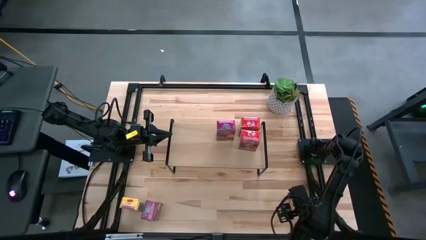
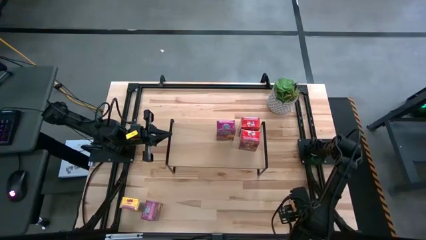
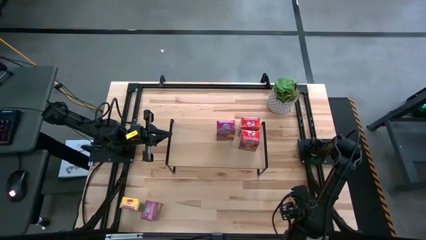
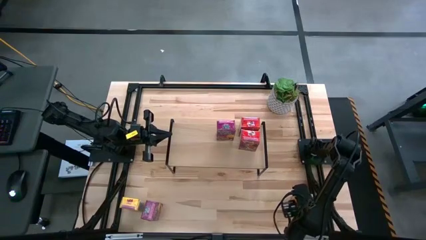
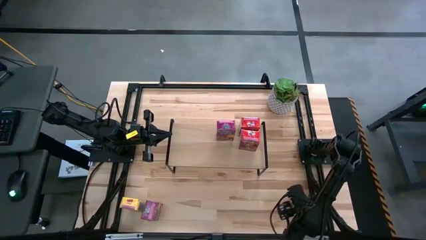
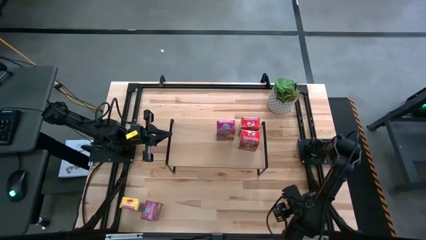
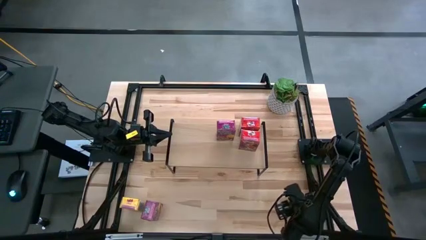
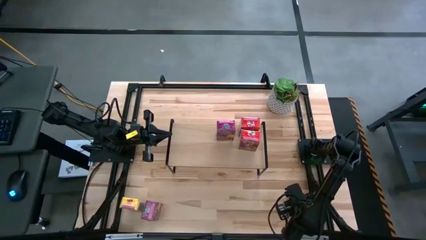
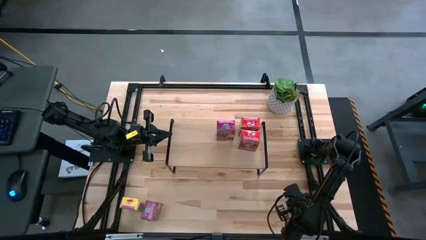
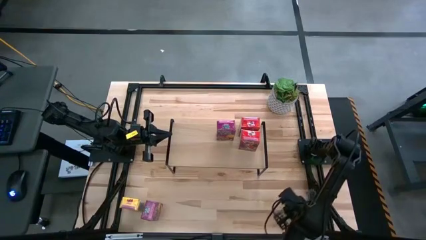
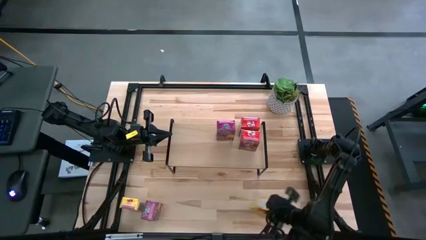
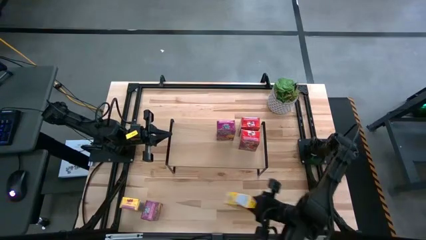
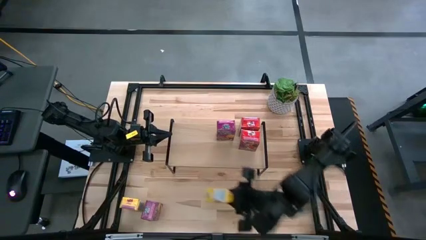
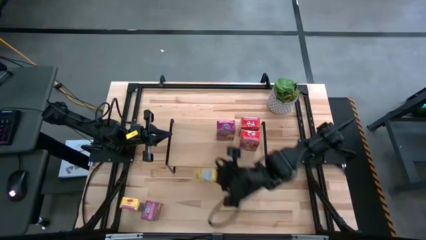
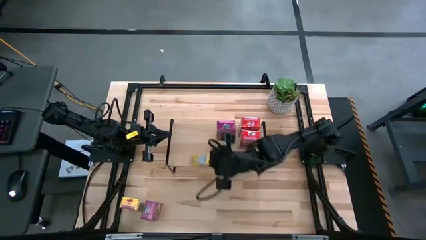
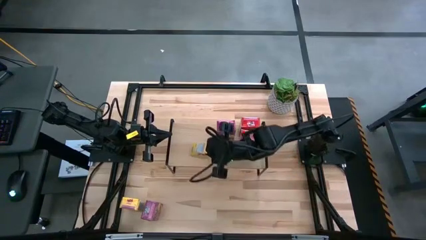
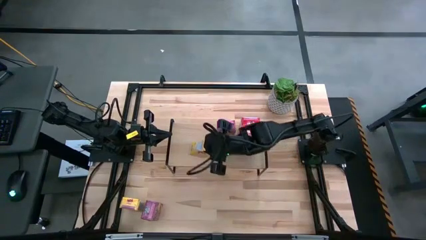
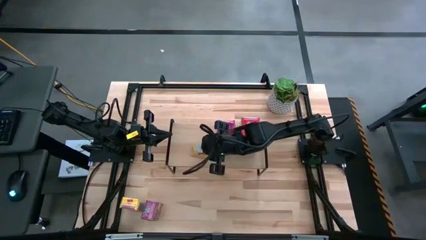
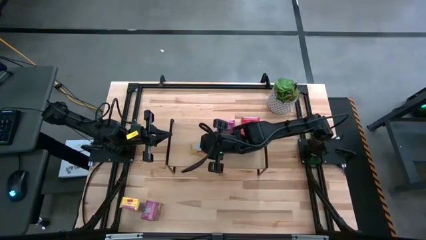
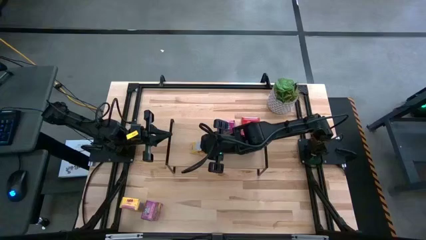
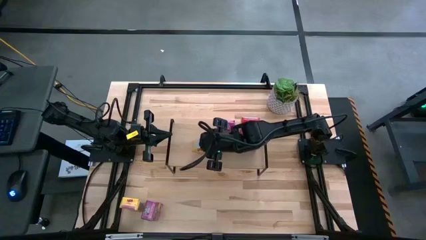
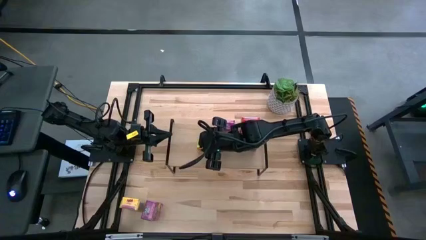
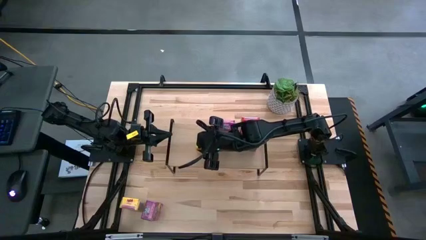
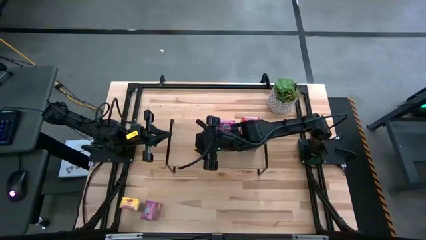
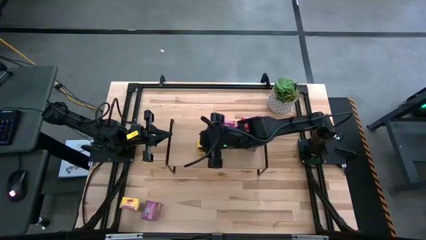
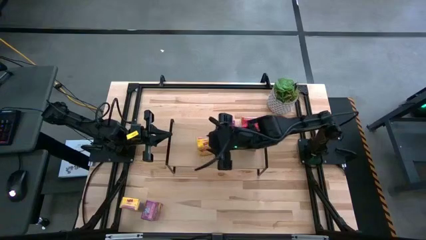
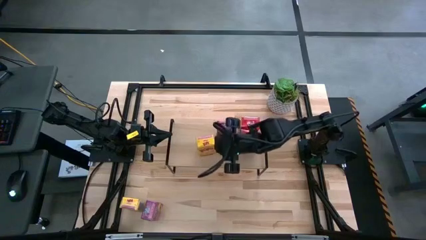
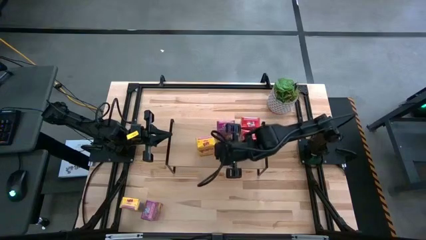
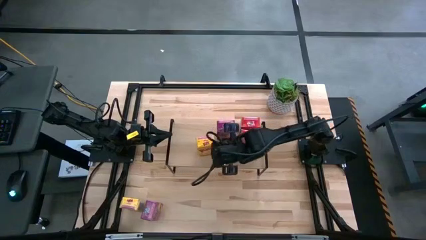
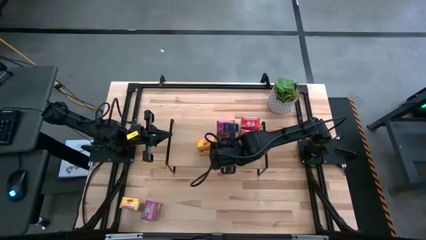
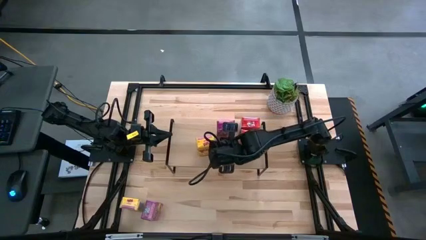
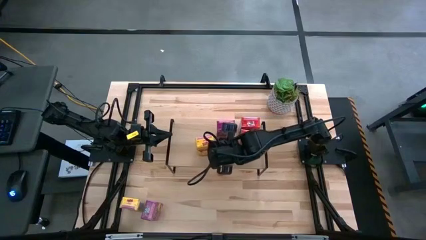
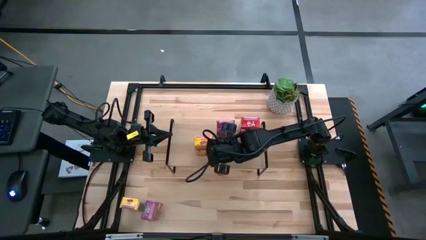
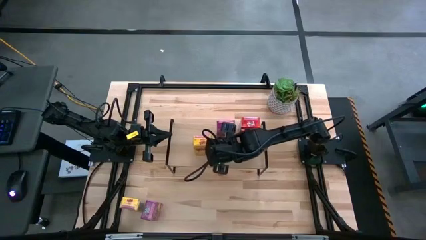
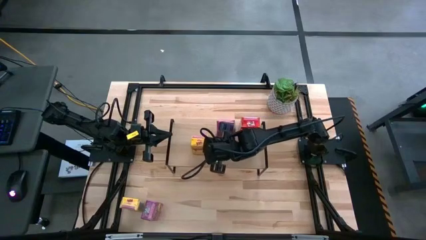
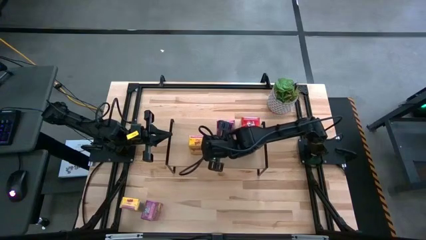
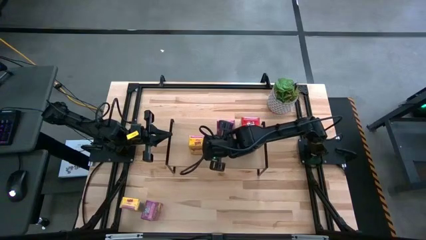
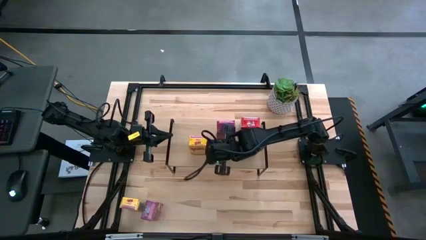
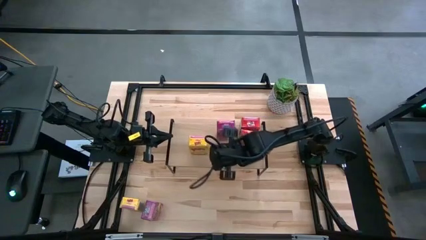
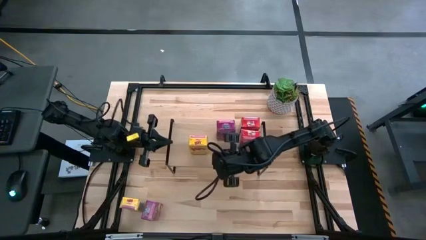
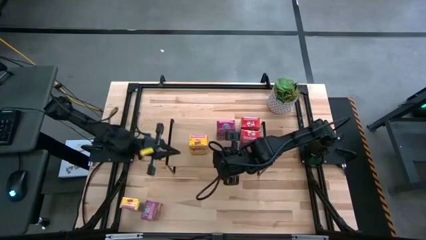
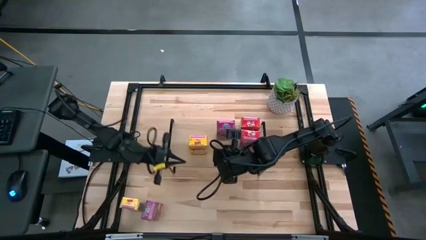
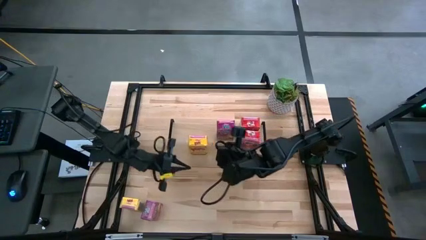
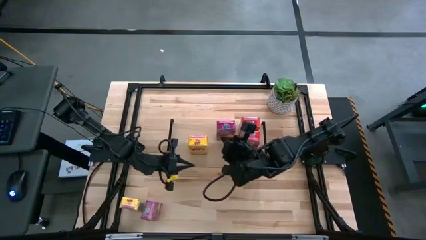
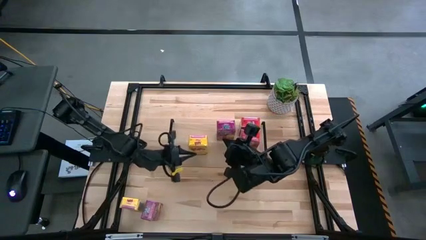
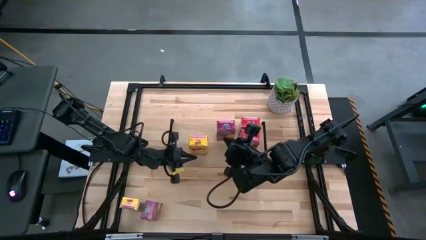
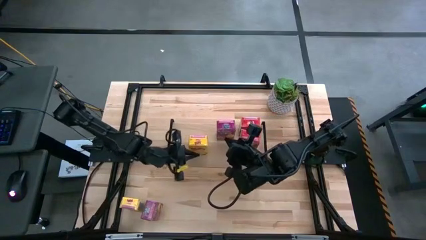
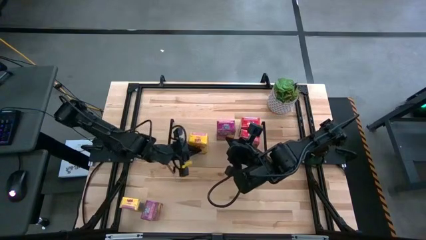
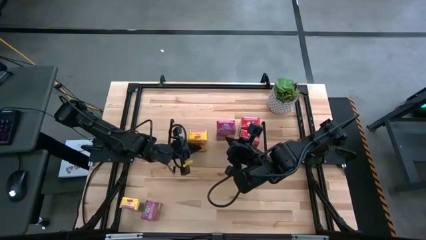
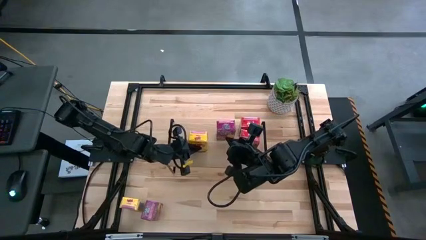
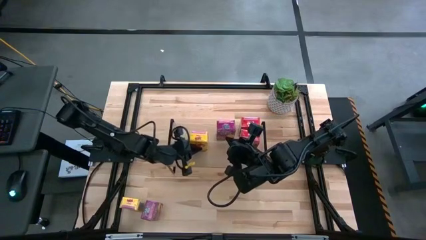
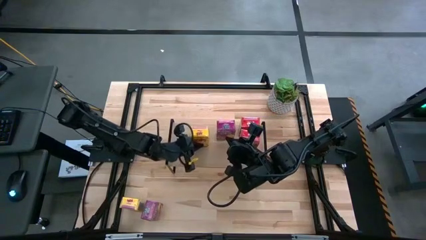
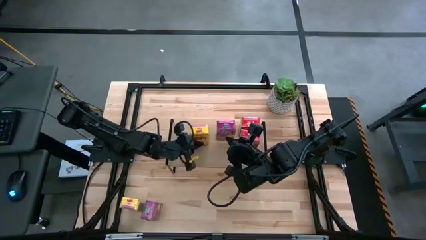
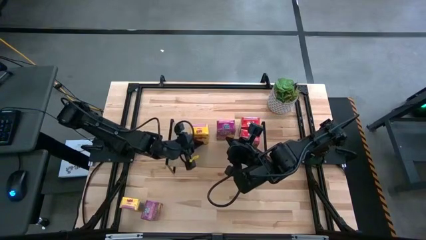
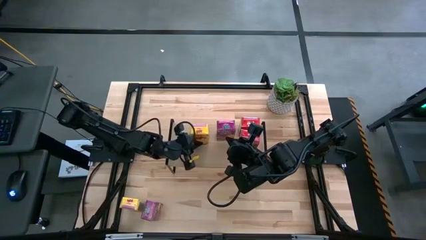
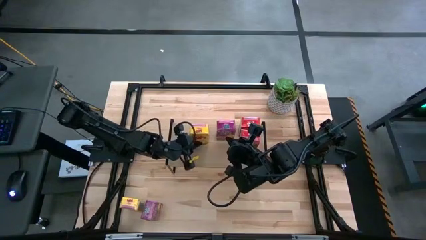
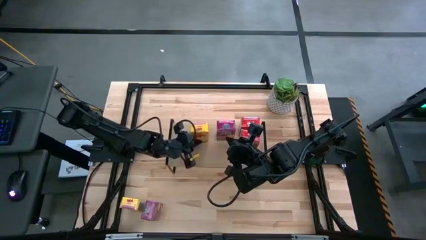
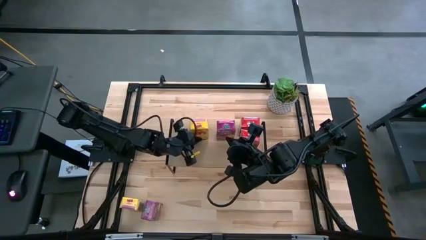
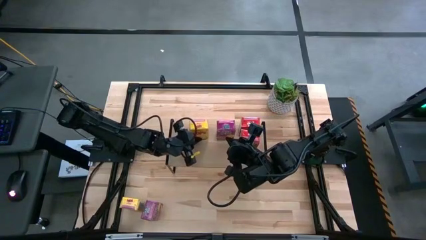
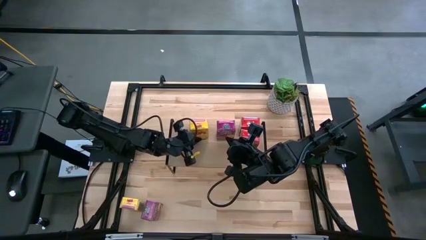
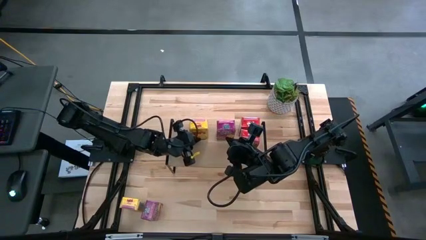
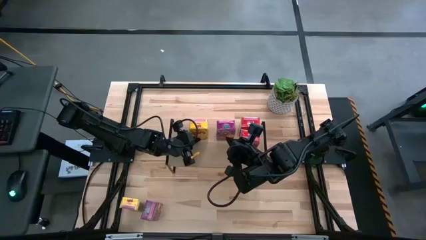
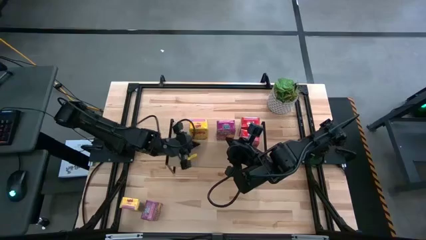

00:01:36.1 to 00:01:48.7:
Task: Stack cereal on shelf
Put the right yellow cereal box on the shelf

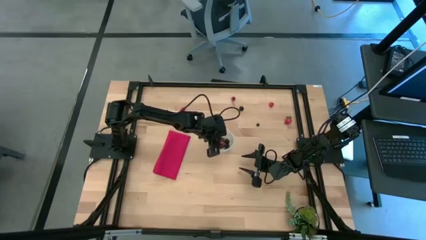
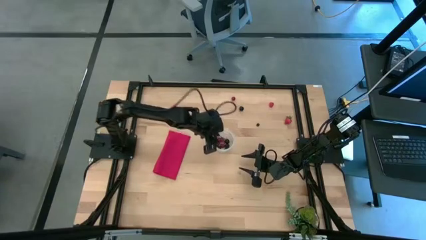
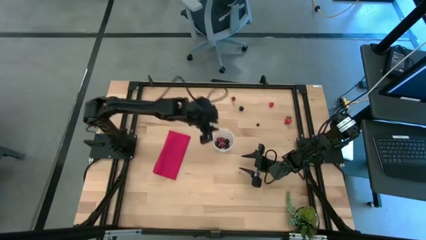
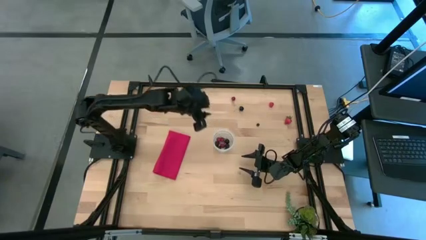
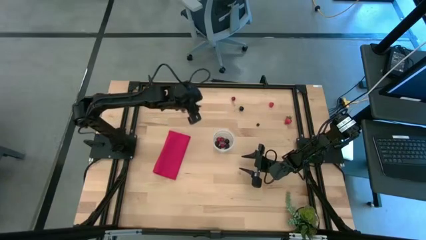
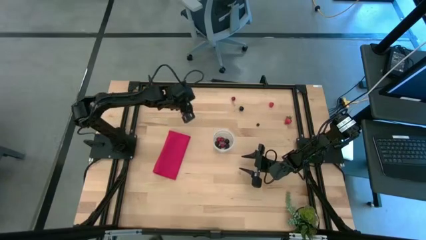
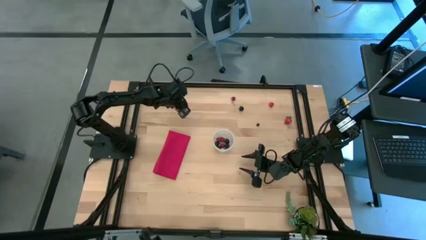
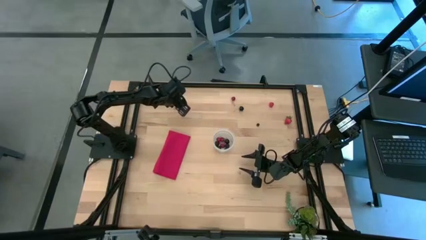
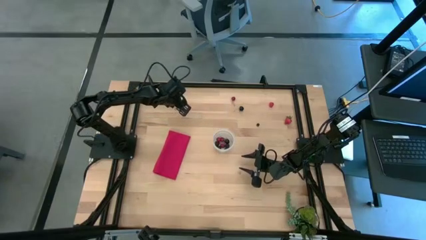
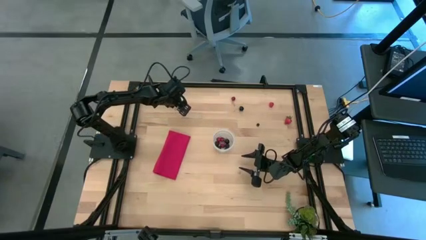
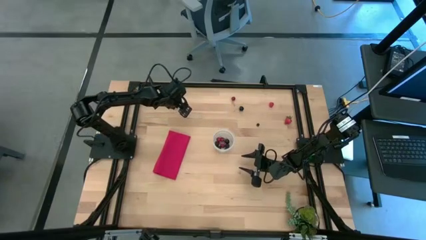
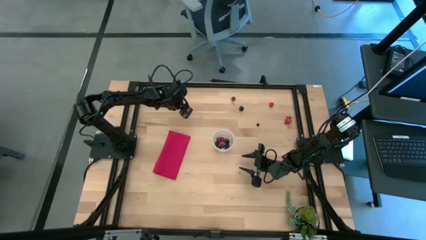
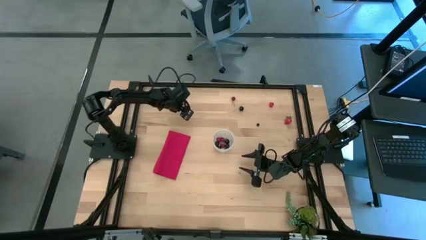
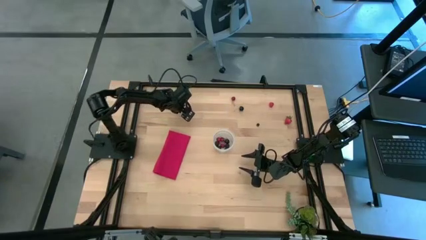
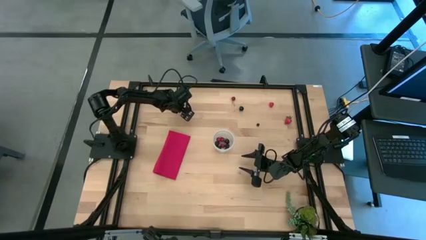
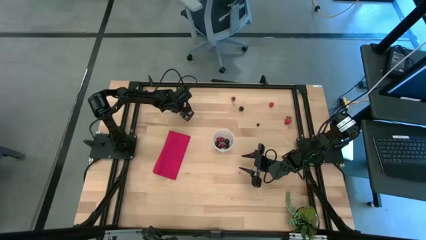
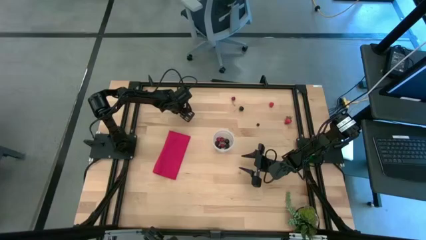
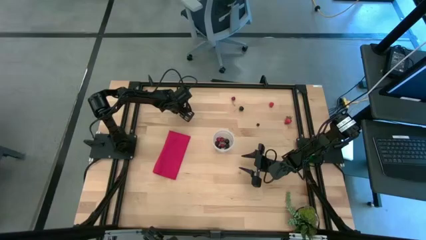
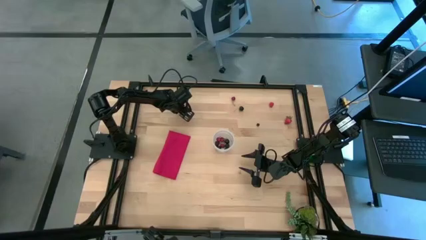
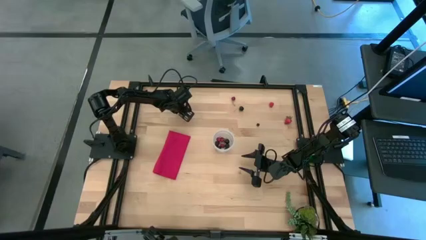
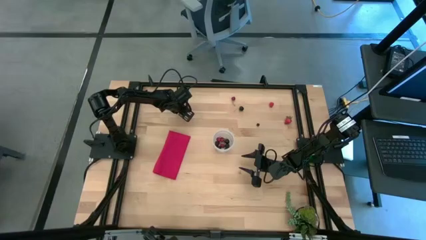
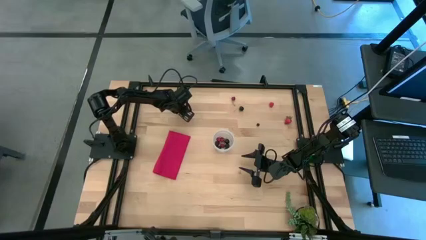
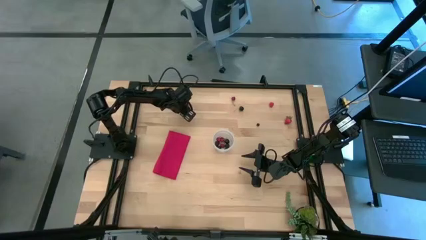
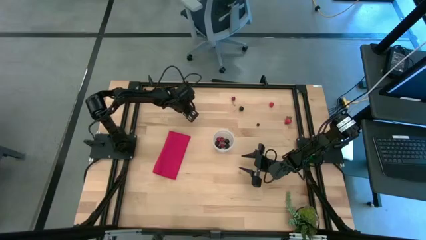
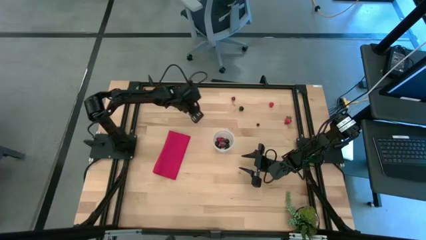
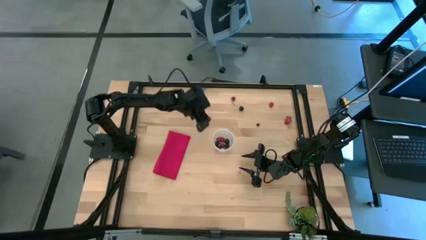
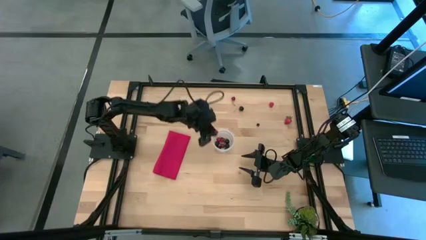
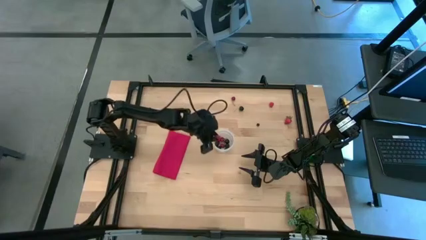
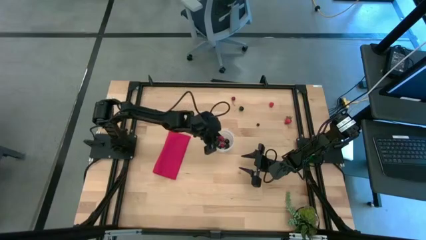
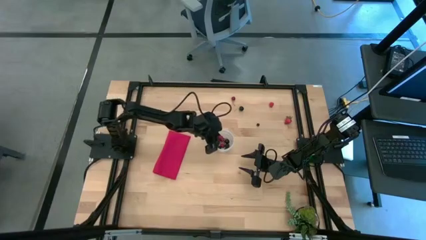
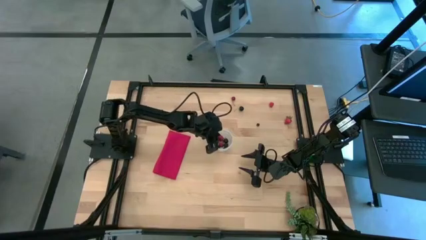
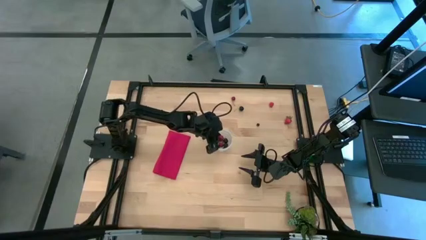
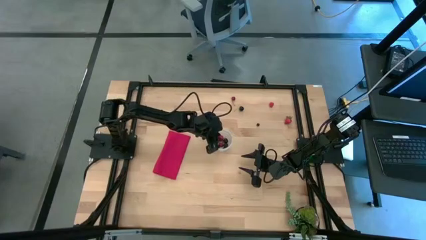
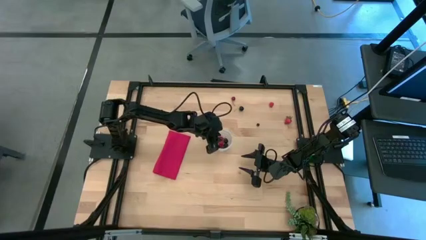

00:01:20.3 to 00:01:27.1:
Task: Pick and placing Produce into tupperware
Put the raspberries into the transparent bin
